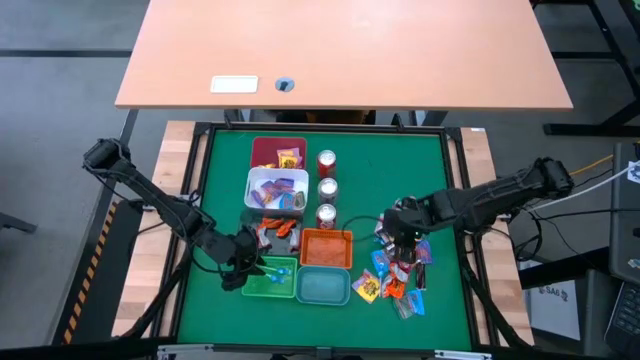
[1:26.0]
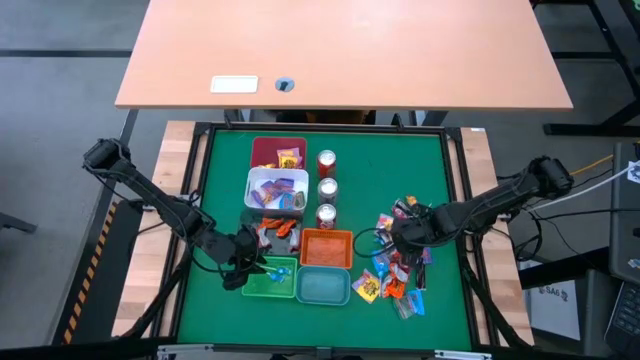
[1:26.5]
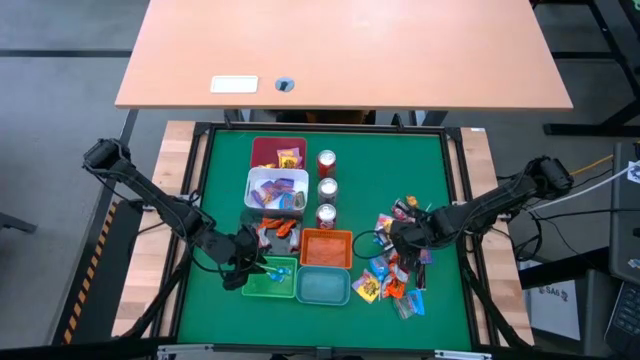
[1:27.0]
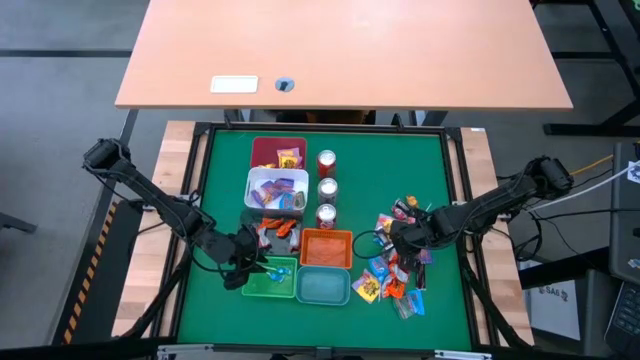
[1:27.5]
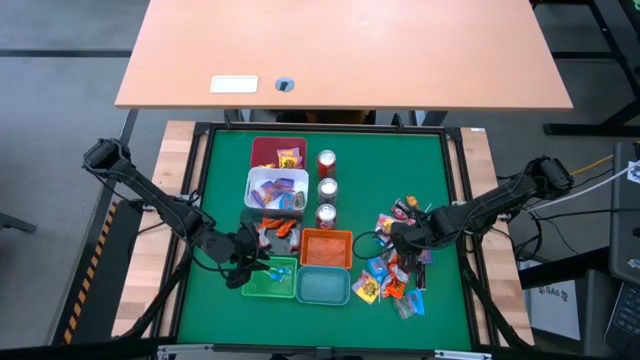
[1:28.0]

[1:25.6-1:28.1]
Task: Sort candy
Put the orange chocolate into the black bin

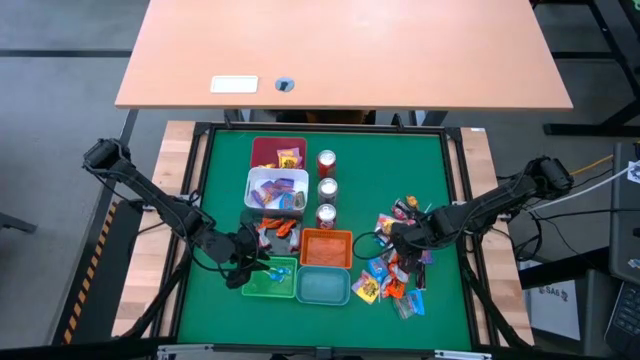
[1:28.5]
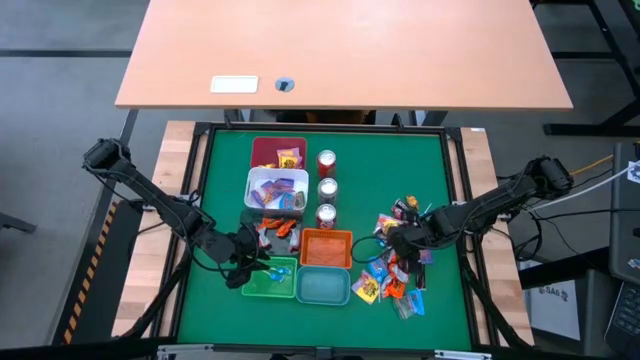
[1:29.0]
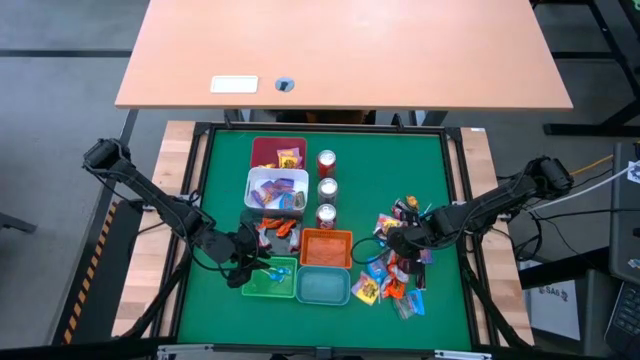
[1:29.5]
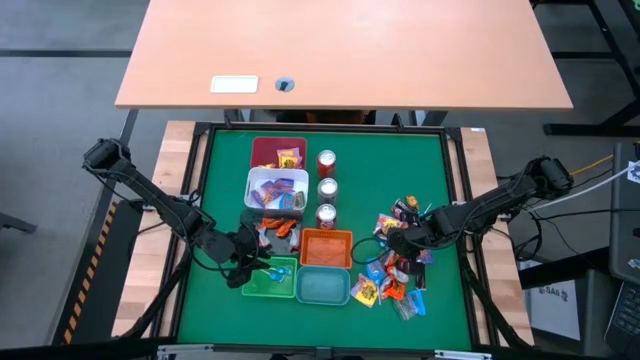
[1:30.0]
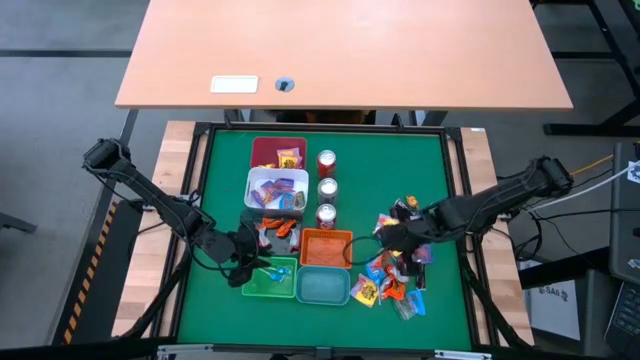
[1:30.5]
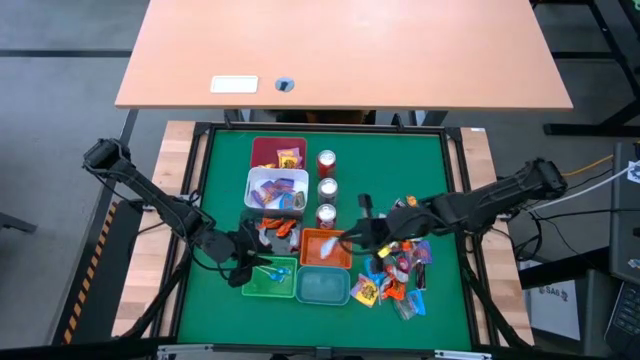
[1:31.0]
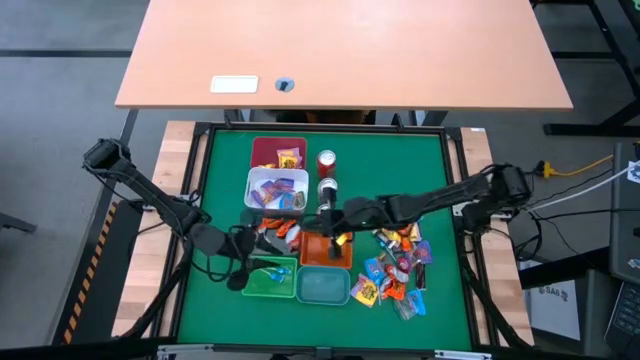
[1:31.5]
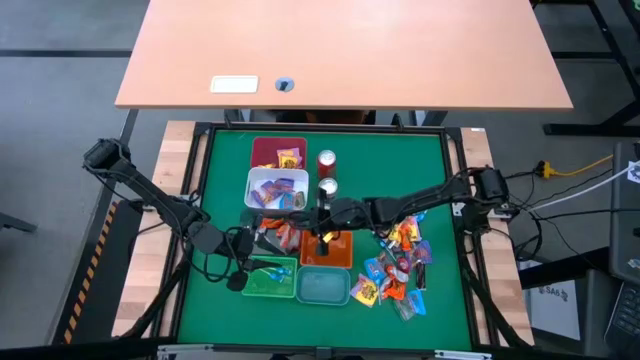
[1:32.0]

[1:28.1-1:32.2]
Put the orange chocolate into the black bin

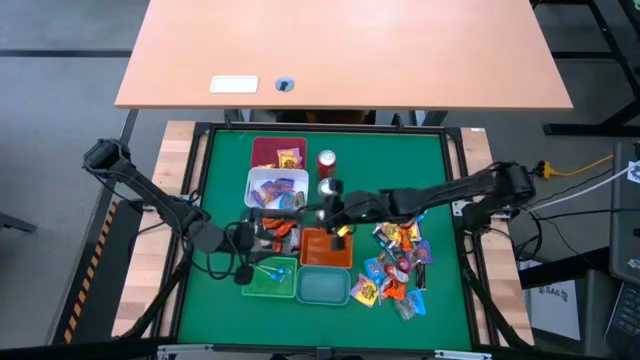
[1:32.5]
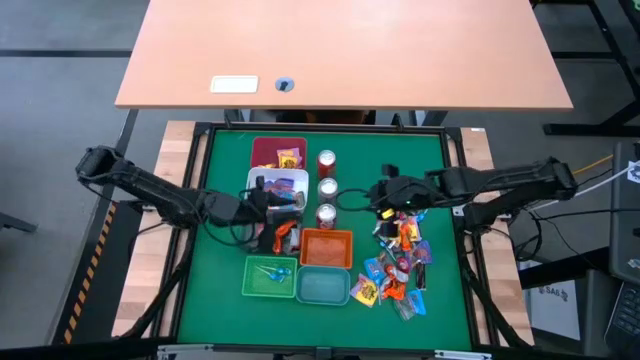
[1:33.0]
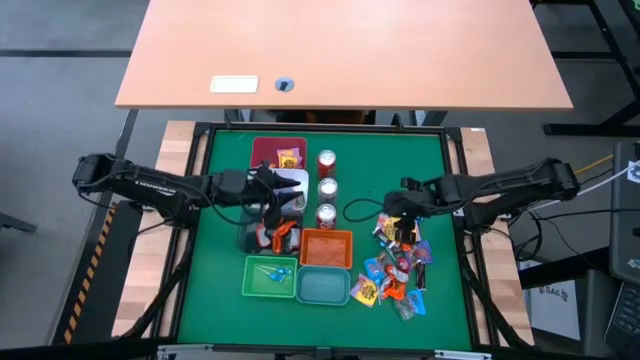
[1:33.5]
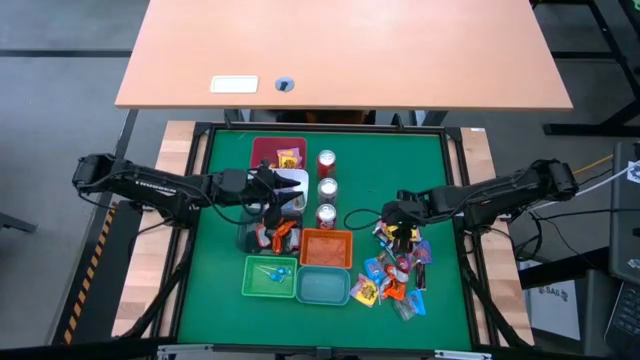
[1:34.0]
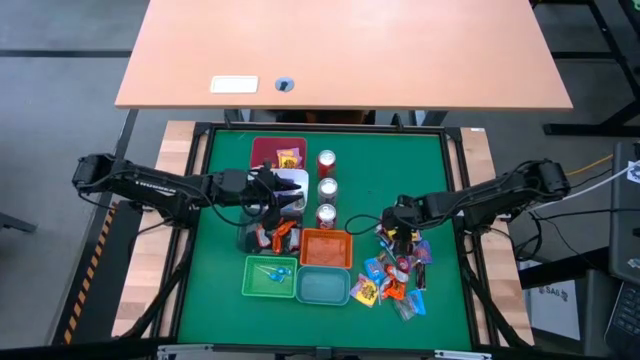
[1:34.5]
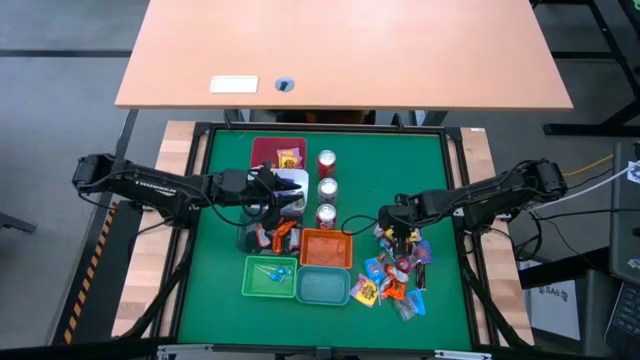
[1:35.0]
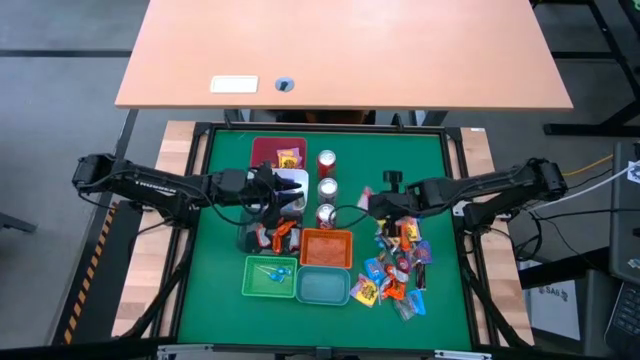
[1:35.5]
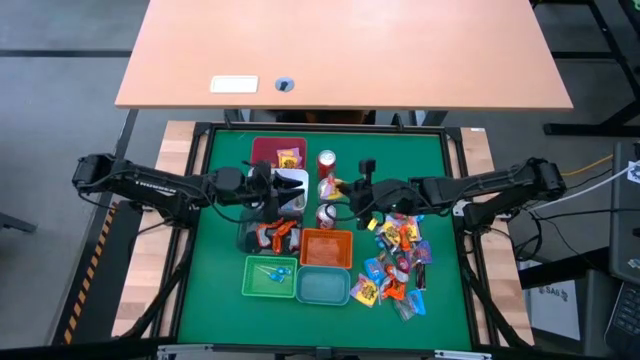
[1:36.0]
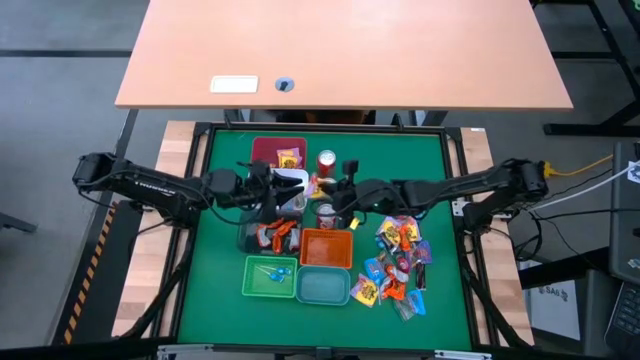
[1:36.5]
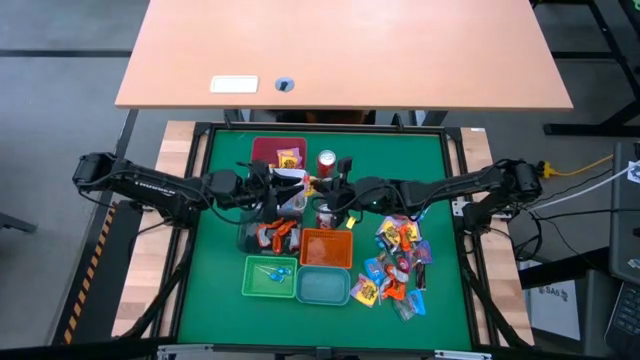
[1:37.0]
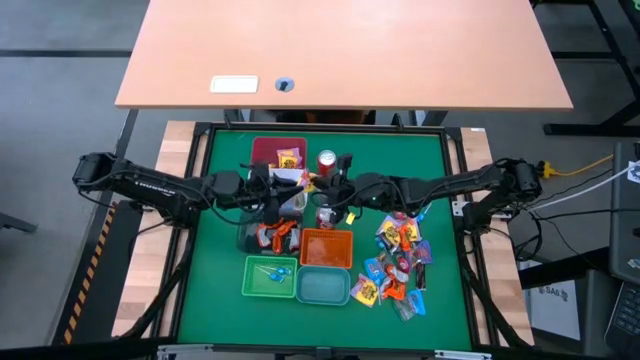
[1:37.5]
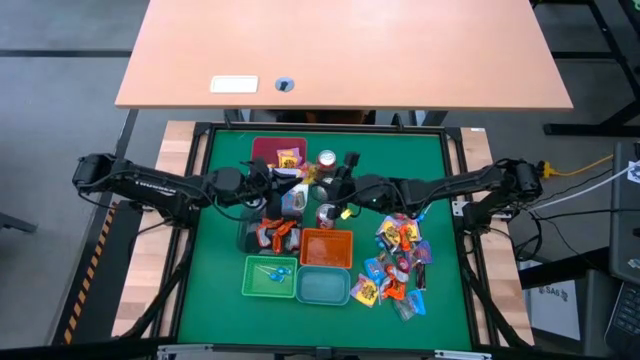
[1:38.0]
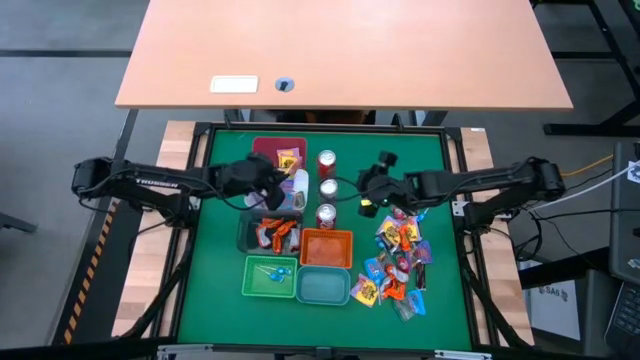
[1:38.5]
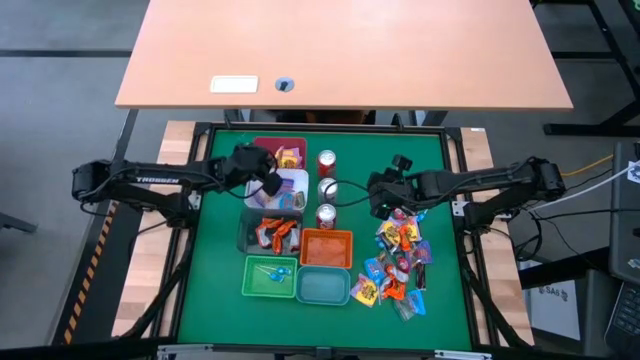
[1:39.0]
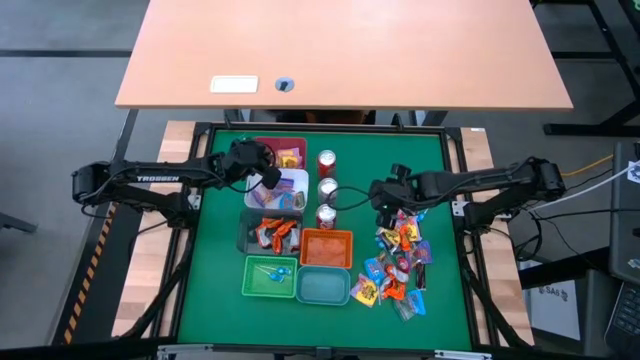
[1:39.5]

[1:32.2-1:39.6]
Put the yellow candy into the red bin

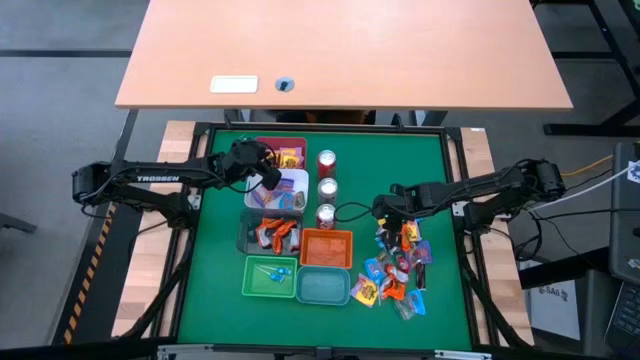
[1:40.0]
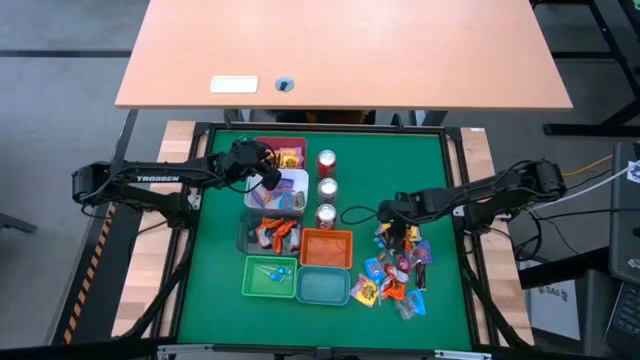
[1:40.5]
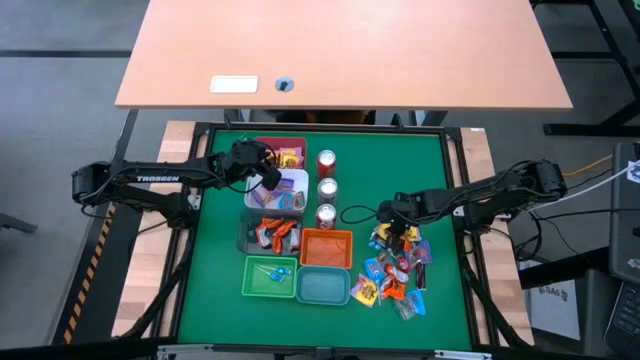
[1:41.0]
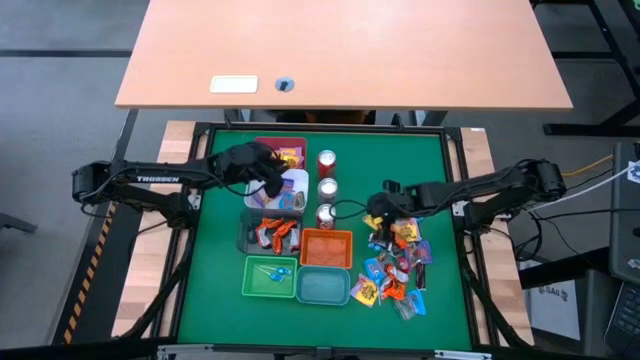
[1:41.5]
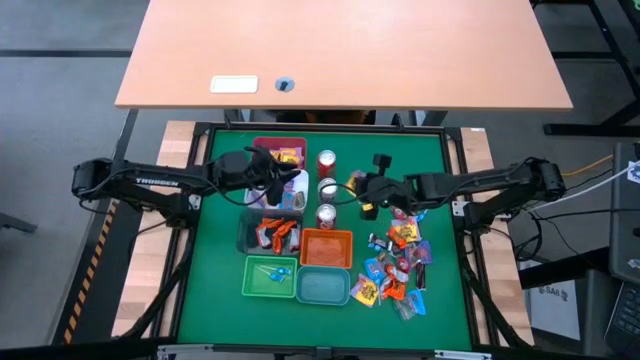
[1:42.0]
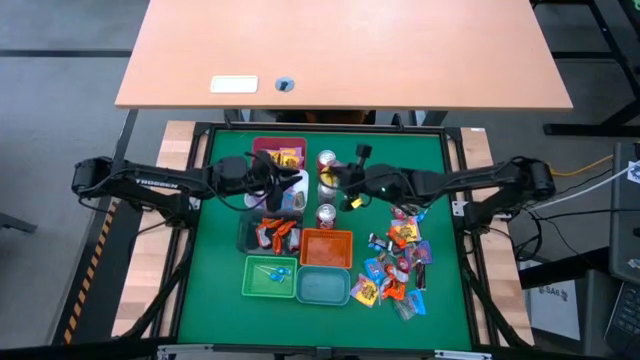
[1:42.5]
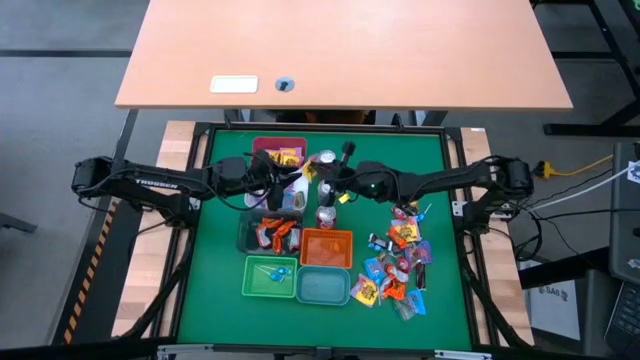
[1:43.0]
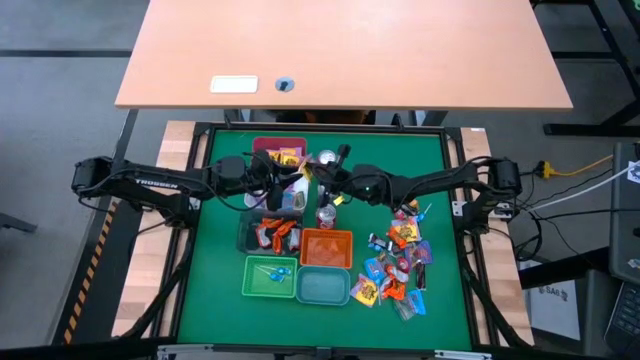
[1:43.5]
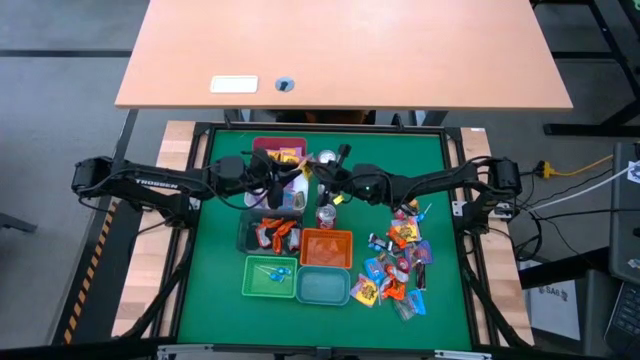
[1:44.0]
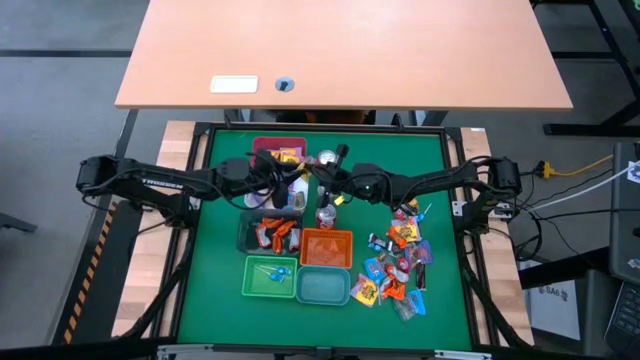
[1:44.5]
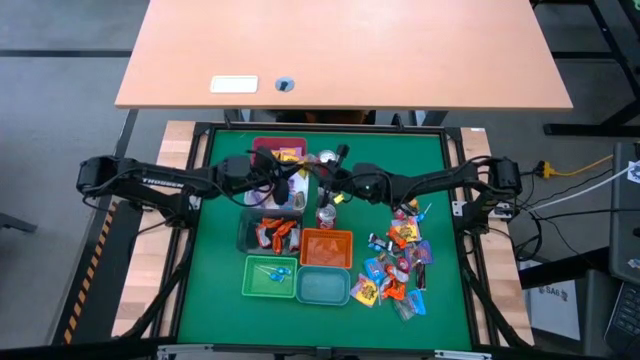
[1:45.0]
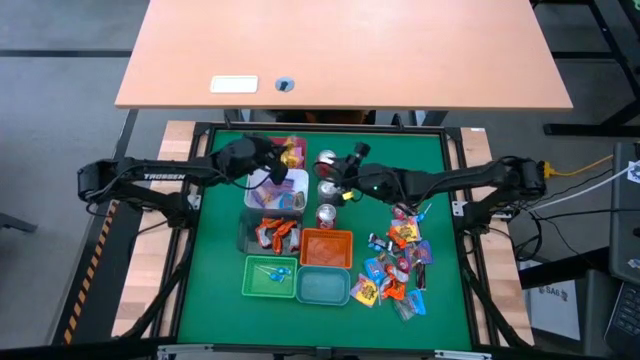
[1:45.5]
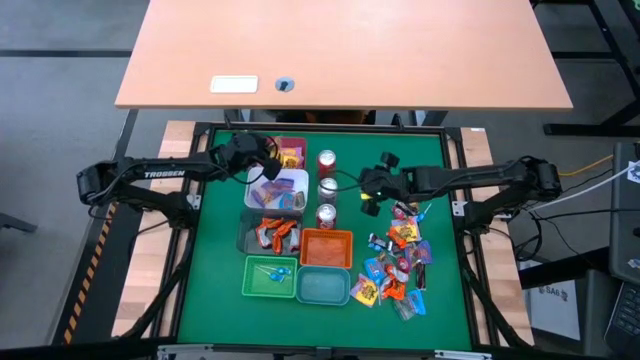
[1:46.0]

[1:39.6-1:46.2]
Put the yellow candy into the red bin

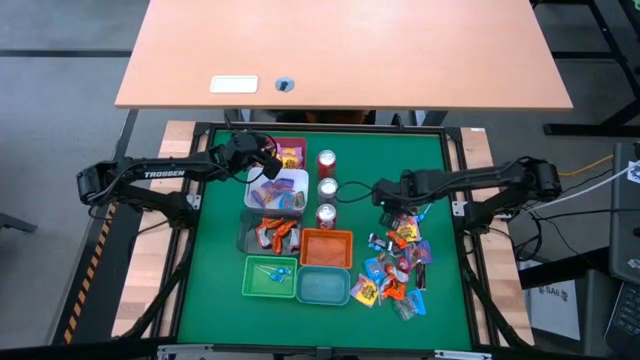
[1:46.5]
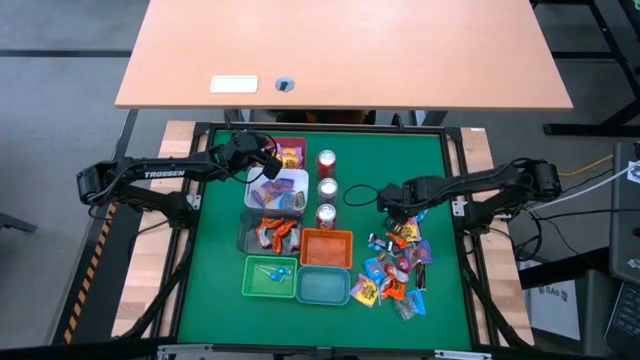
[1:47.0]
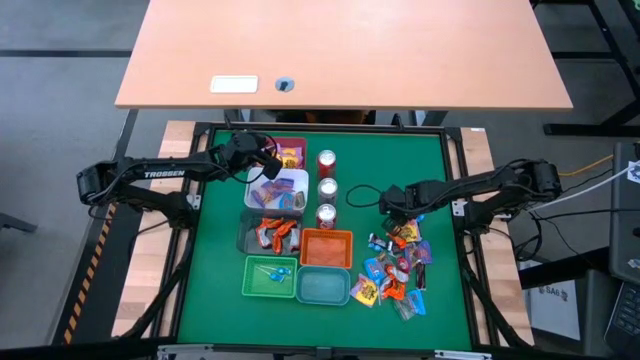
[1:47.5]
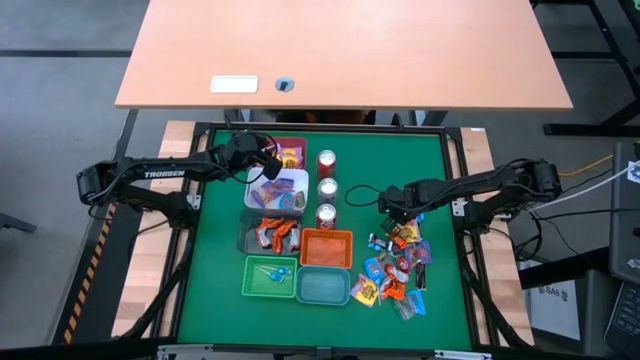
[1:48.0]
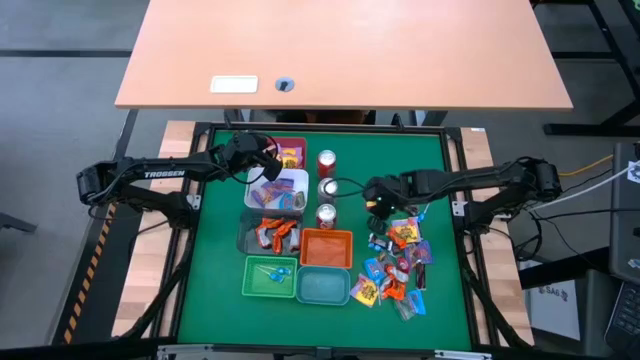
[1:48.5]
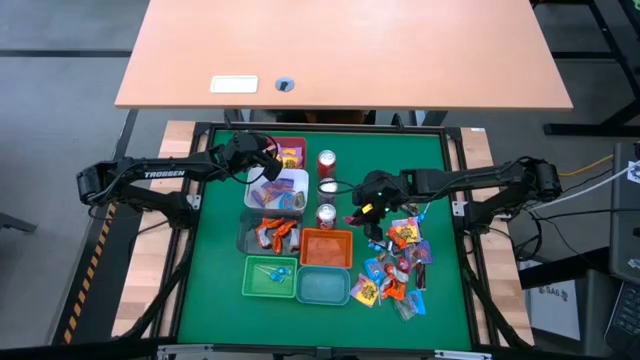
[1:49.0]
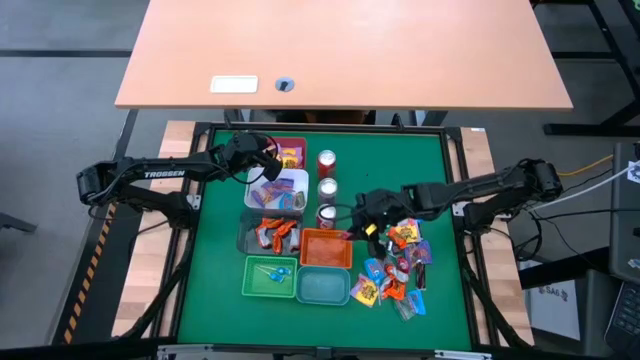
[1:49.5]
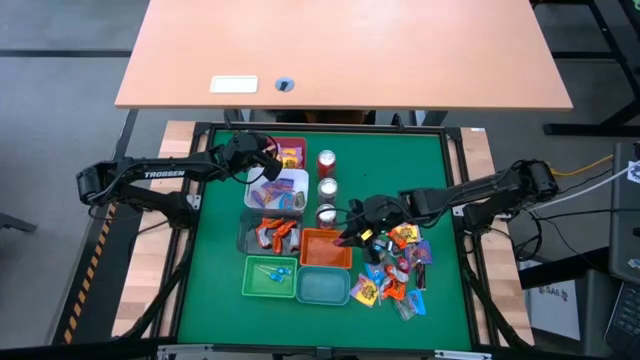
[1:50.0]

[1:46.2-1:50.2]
Put the red candy into the center orange bin
